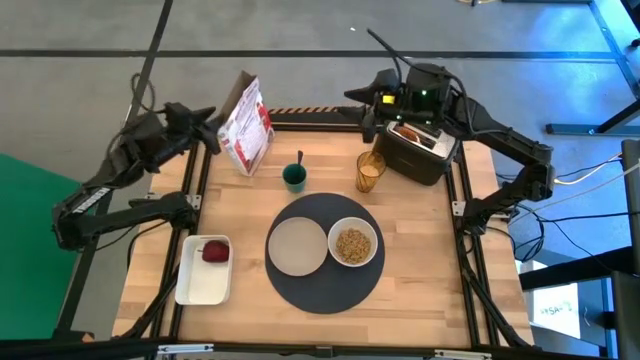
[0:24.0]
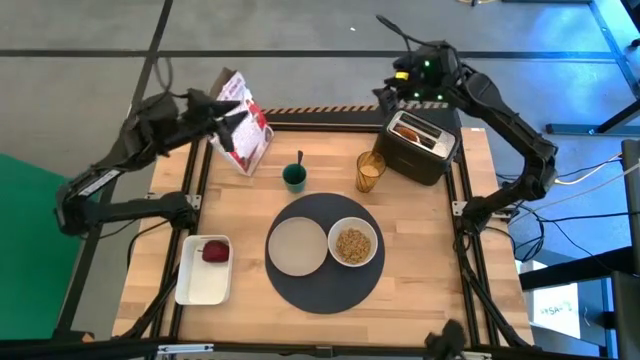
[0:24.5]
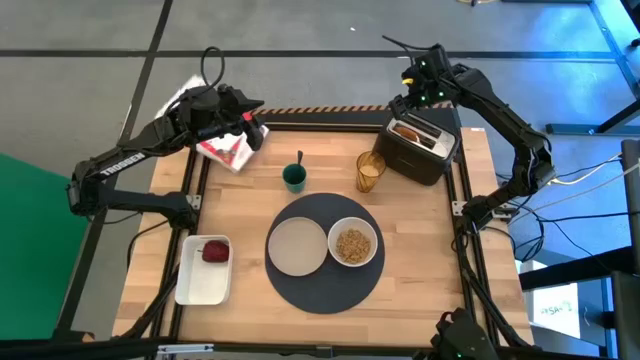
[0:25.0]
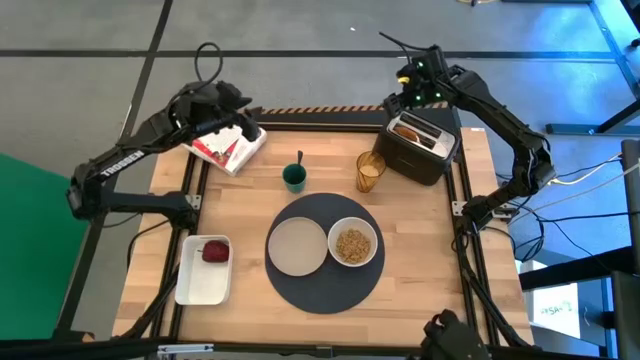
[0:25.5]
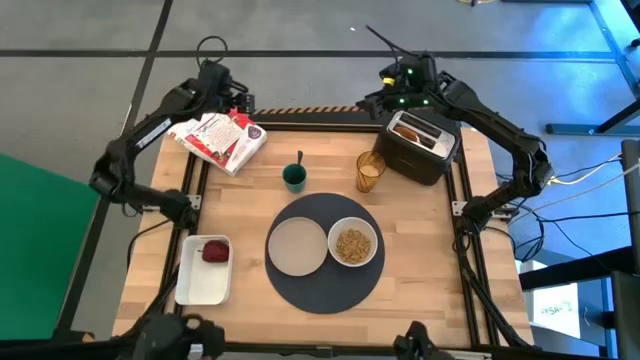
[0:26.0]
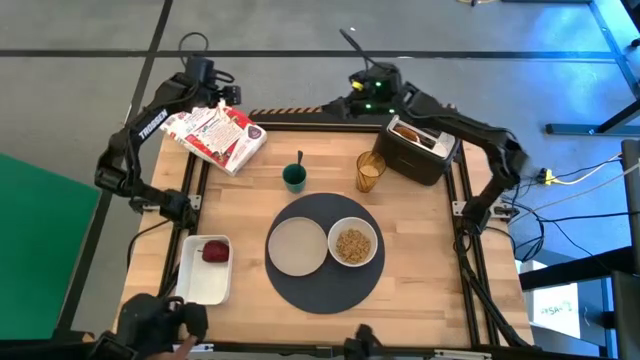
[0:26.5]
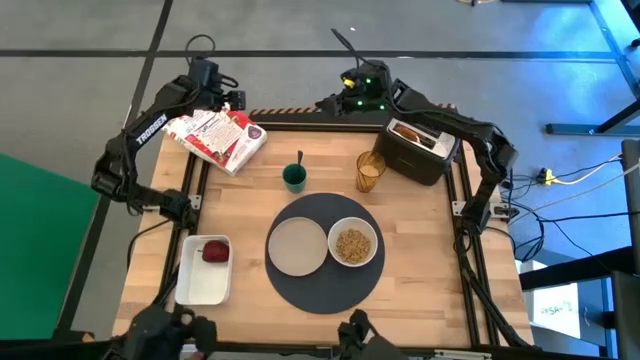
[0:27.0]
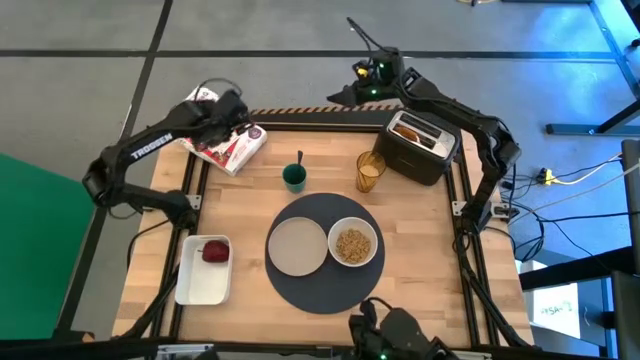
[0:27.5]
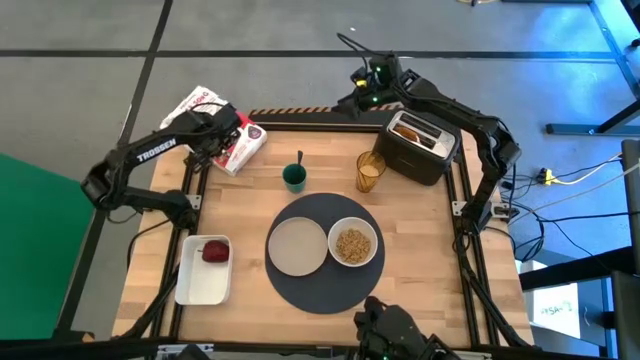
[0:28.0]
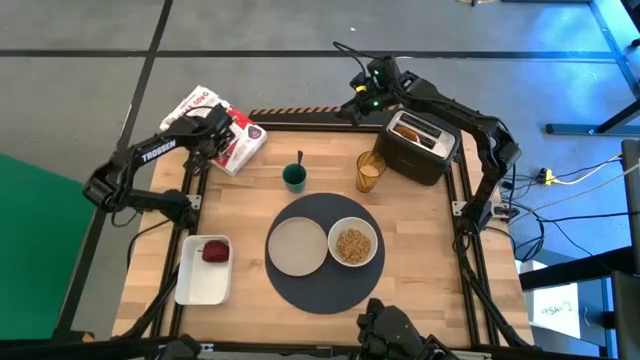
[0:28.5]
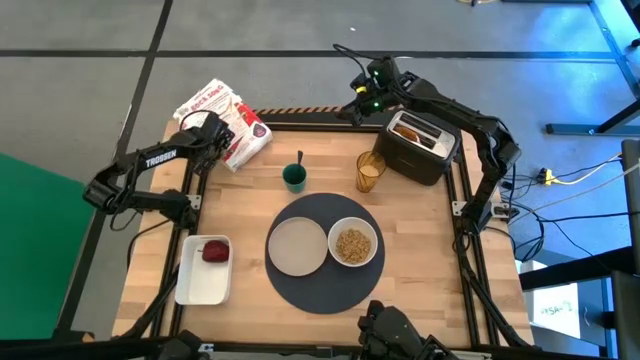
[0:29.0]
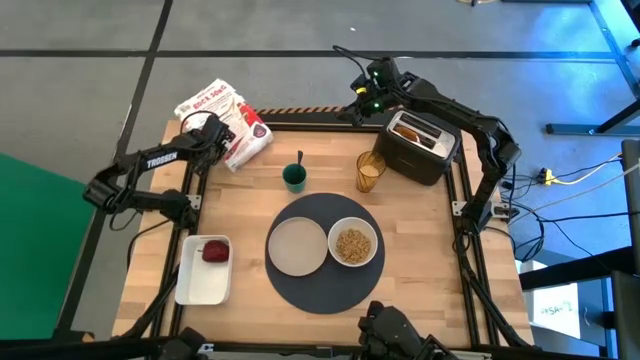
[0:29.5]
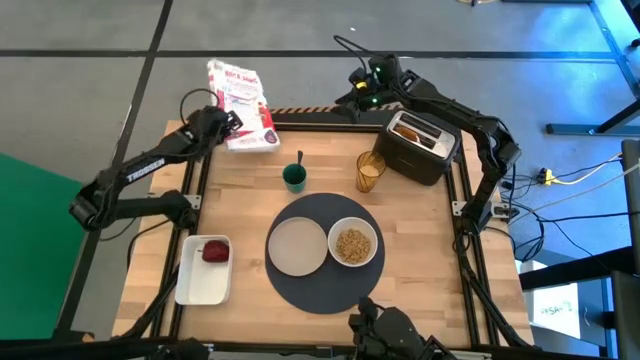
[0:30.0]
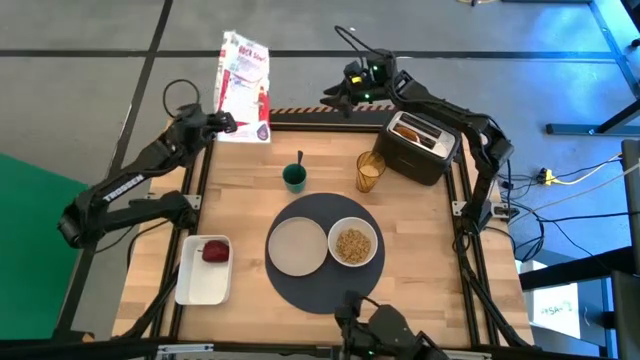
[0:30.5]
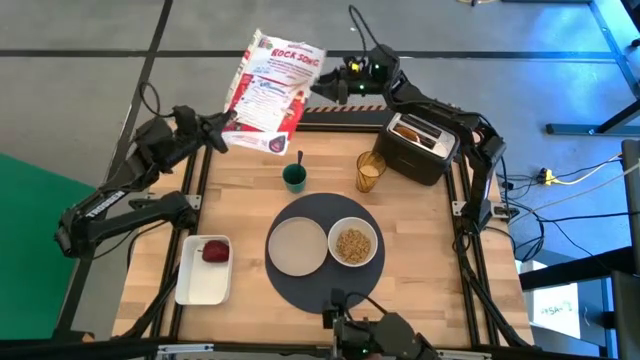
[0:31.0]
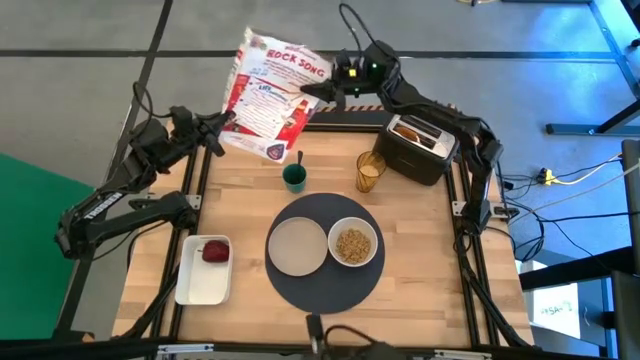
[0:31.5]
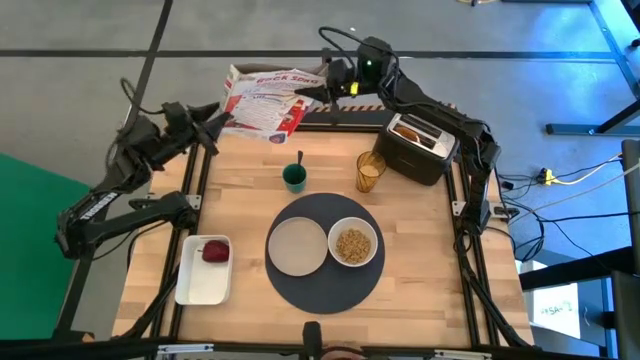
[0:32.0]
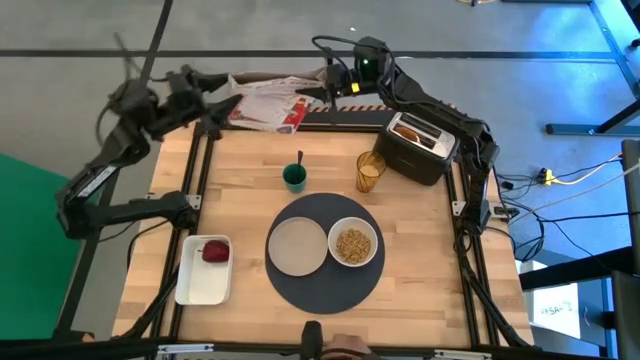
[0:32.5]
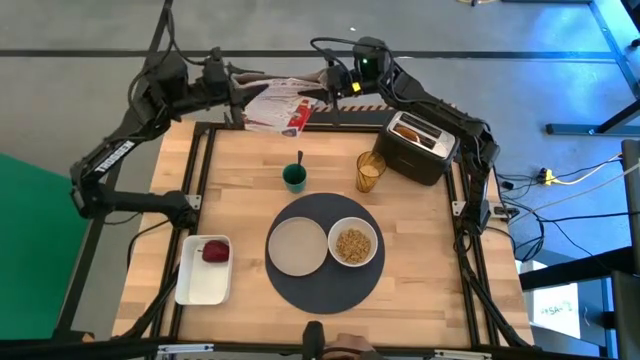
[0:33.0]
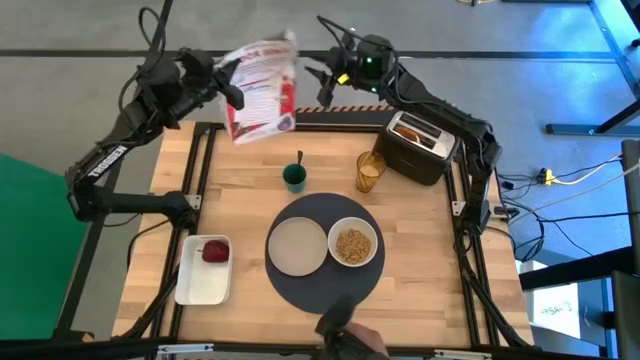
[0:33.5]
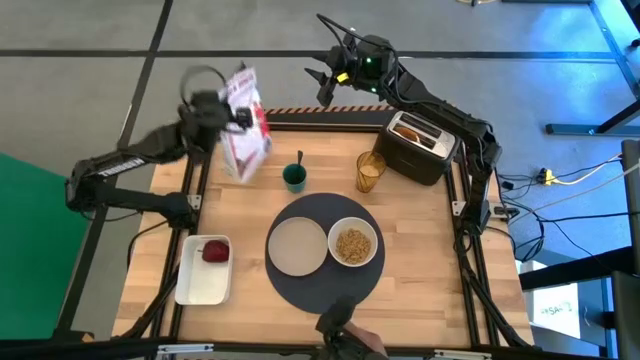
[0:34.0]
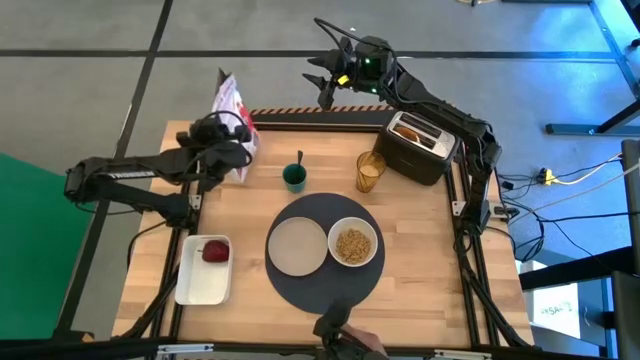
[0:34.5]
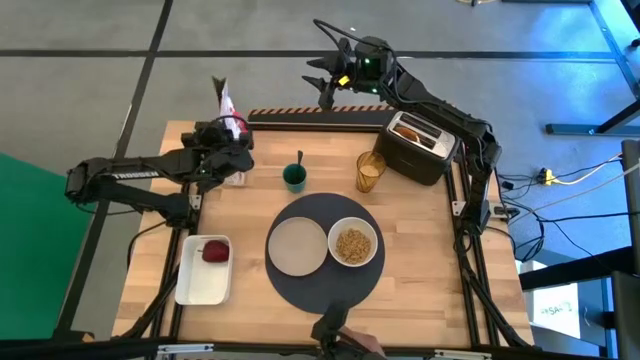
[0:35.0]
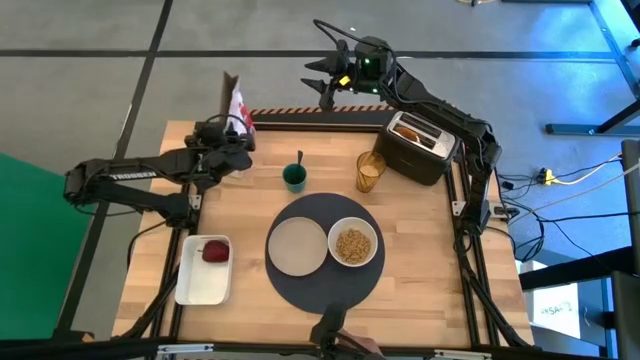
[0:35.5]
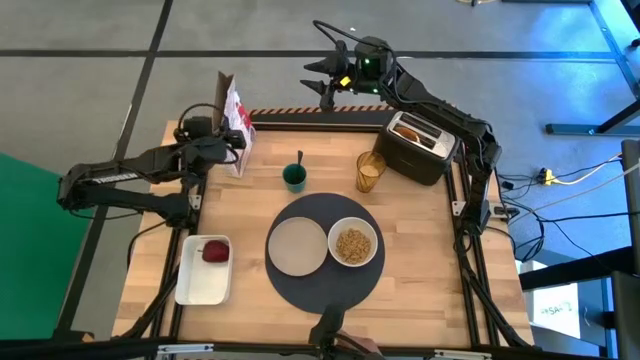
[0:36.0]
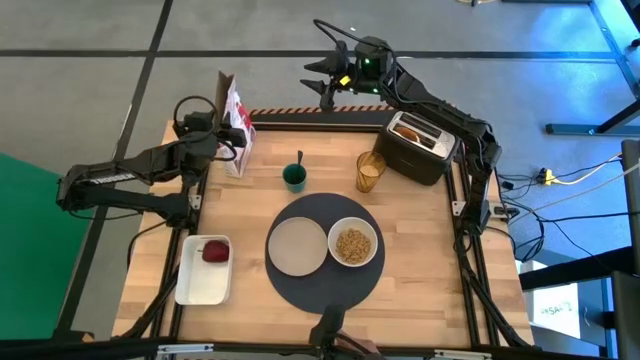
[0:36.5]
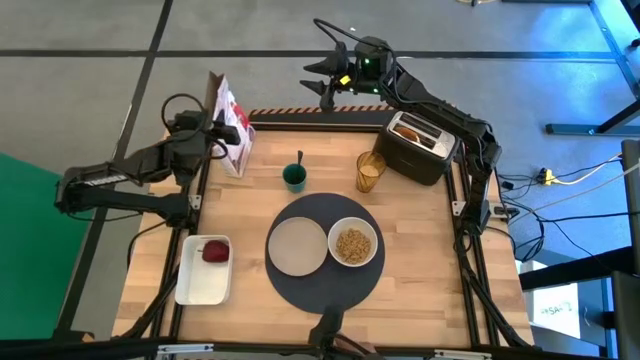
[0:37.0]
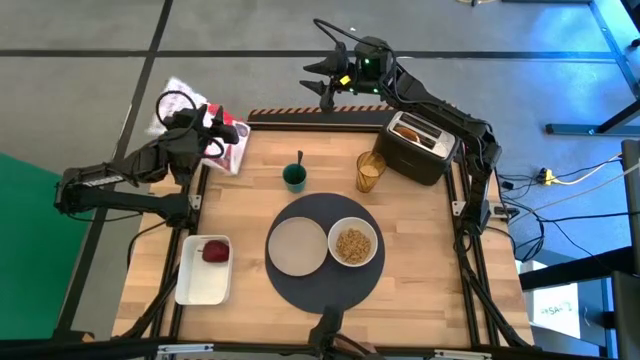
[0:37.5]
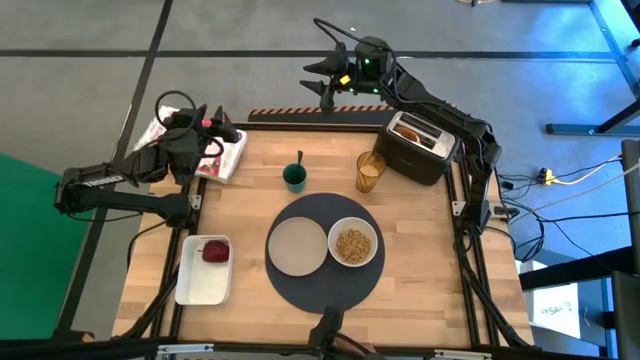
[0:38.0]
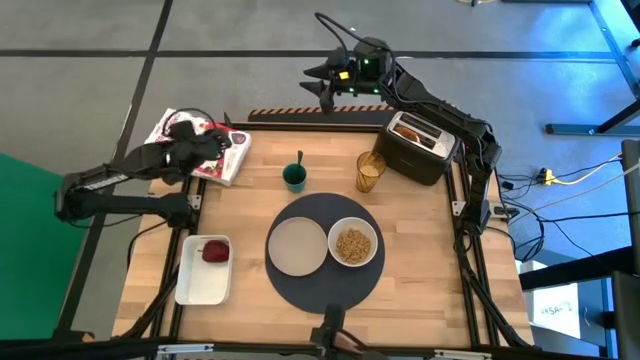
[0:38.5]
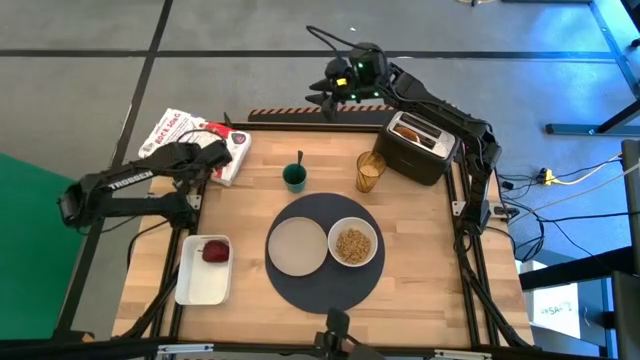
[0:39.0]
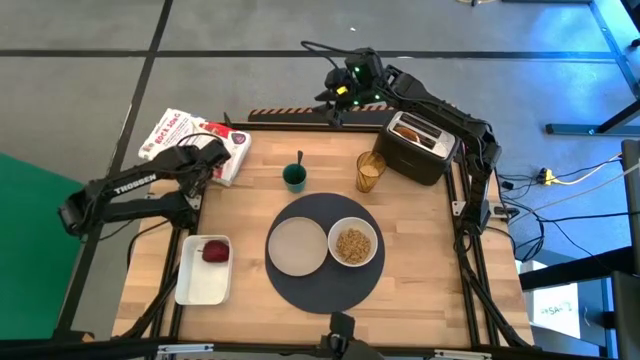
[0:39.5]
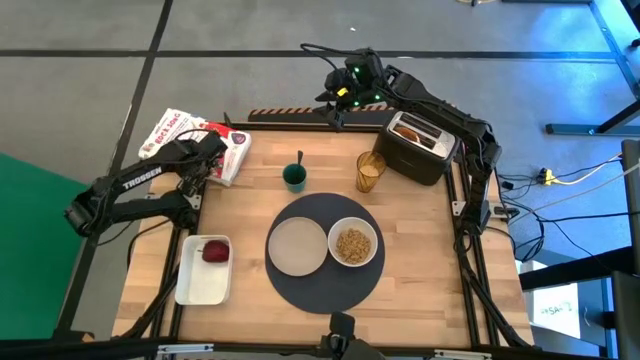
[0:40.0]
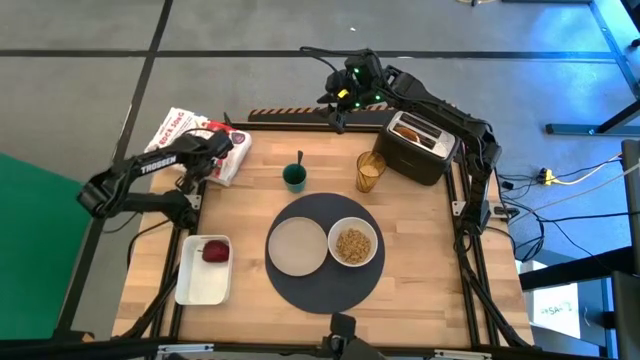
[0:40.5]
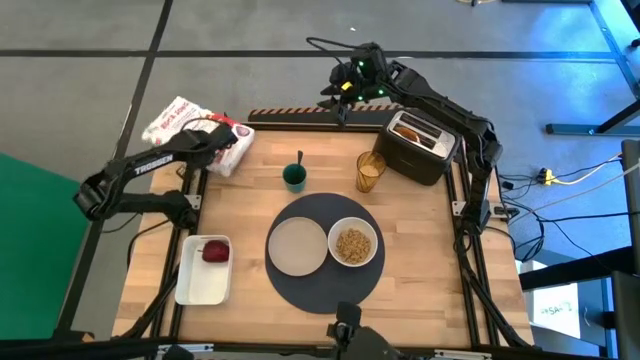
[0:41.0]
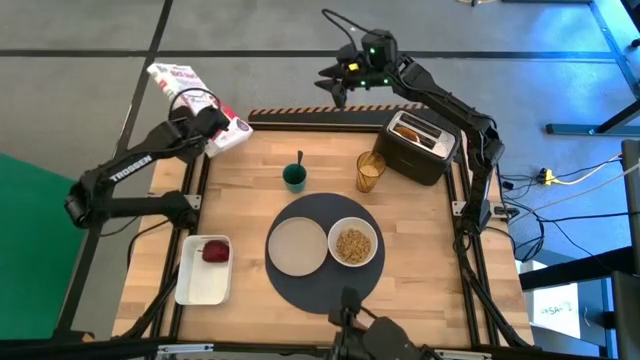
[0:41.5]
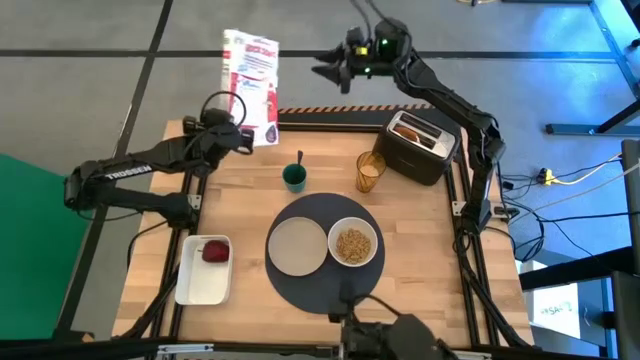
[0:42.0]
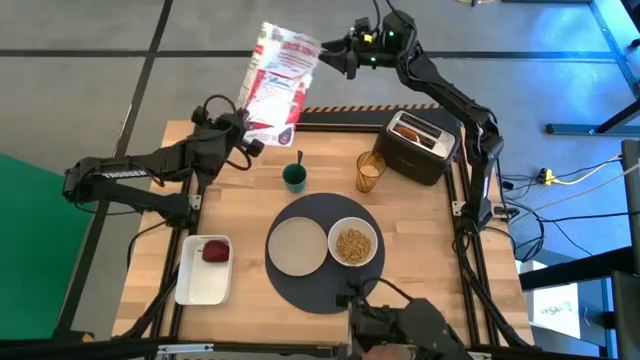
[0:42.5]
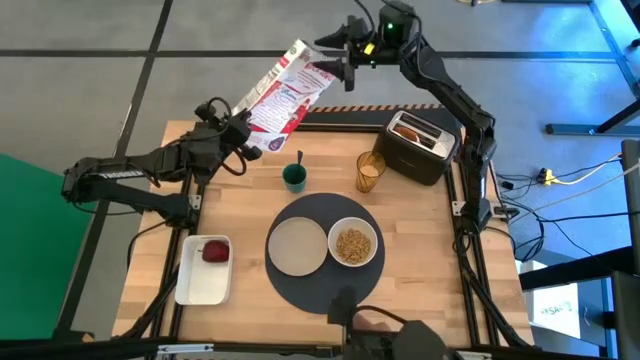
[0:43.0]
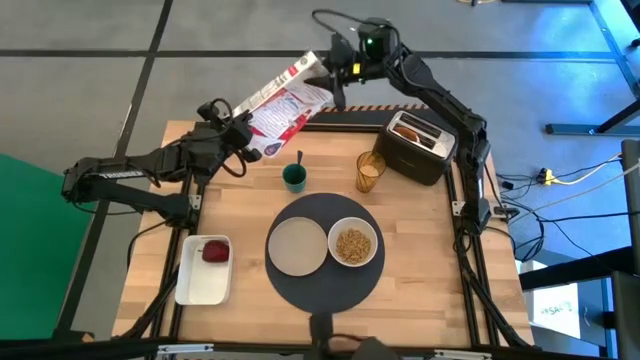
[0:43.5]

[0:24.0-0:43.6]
Task: Arrange a breakfast setting
Adjust the cereal box

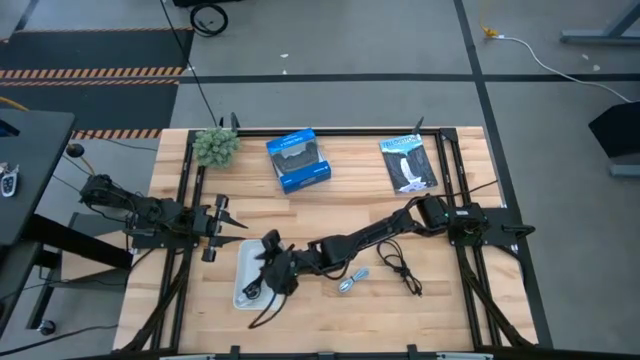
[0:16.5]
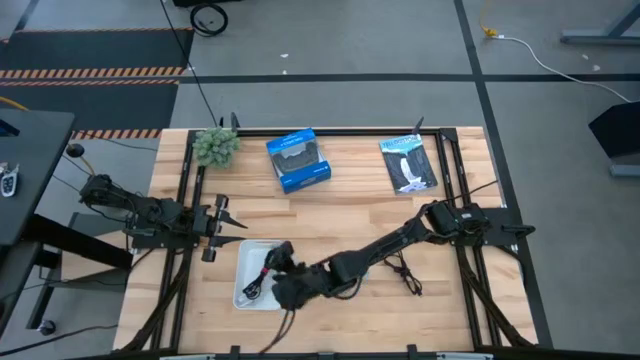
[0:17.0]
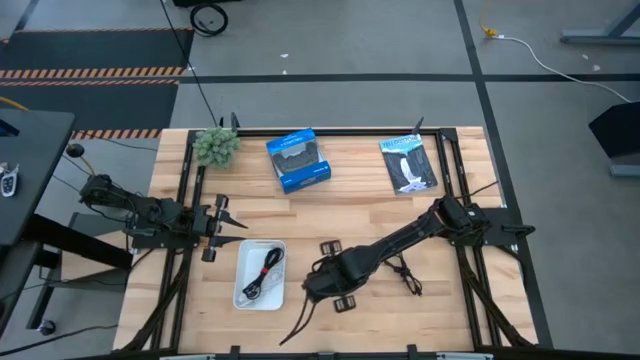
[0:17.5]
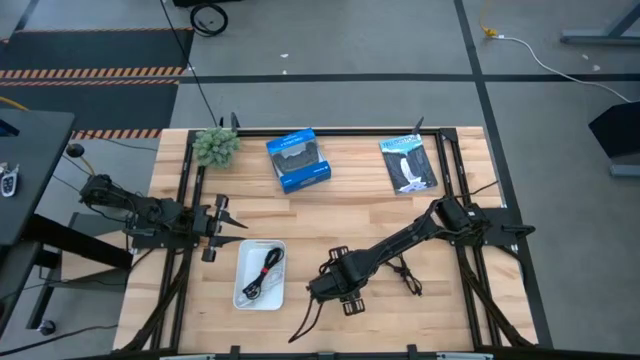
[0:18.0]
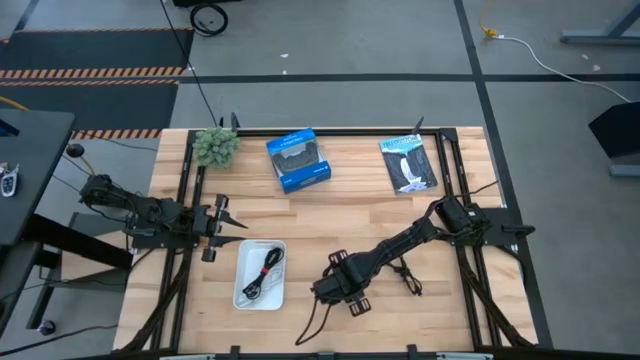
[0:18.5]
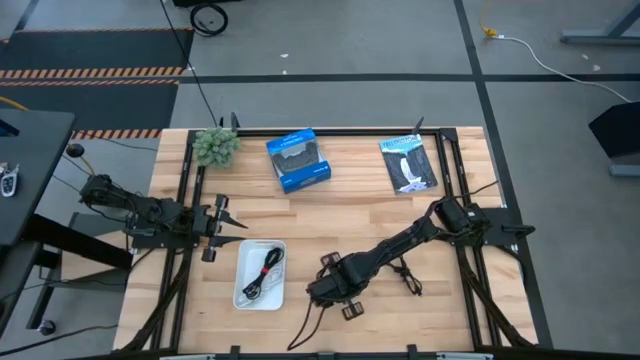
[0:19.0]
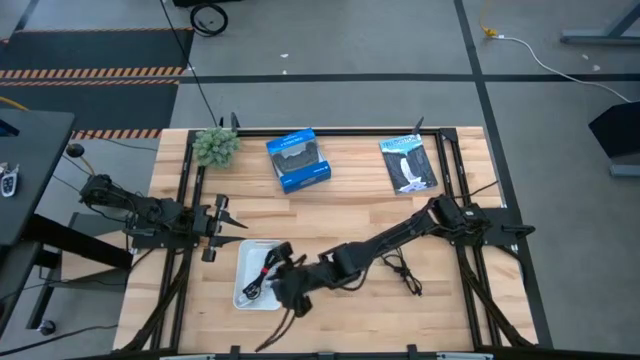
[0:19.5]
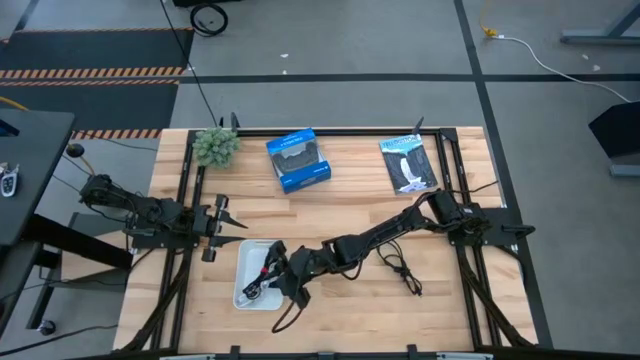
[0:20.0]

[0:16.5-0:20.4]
Task: Pick and place USB-C Cables
Put the blue charger cable into the white bin
